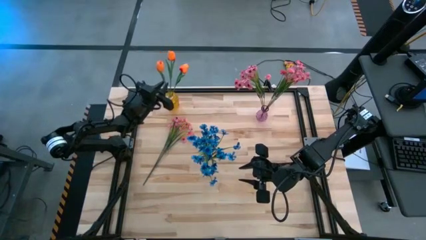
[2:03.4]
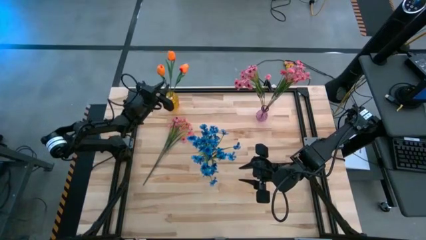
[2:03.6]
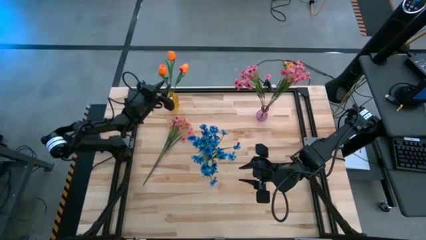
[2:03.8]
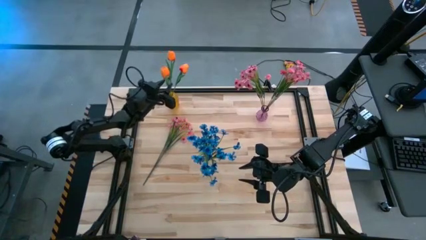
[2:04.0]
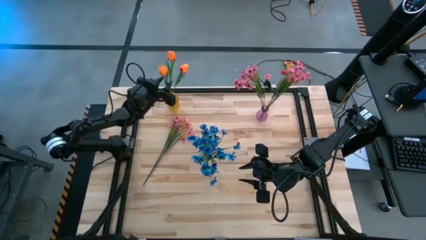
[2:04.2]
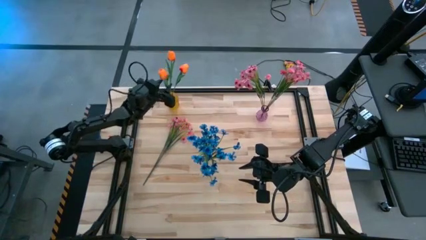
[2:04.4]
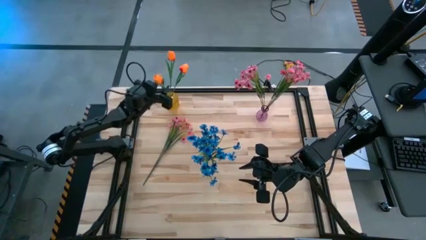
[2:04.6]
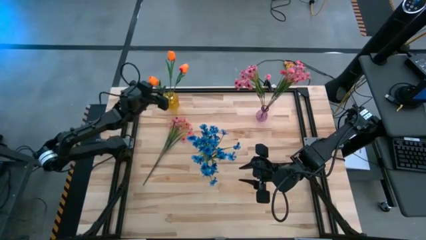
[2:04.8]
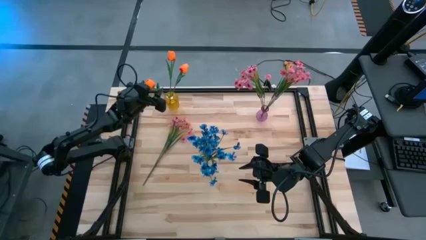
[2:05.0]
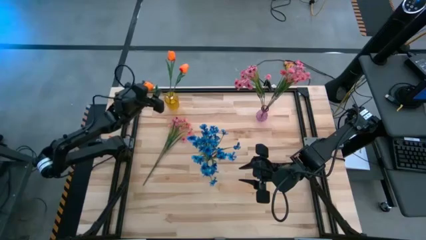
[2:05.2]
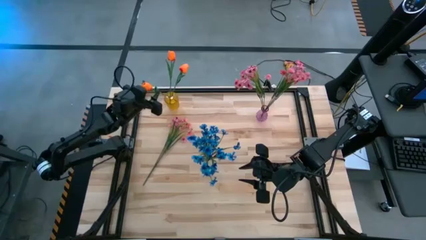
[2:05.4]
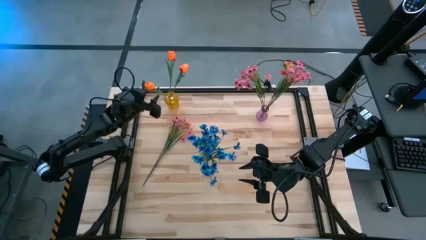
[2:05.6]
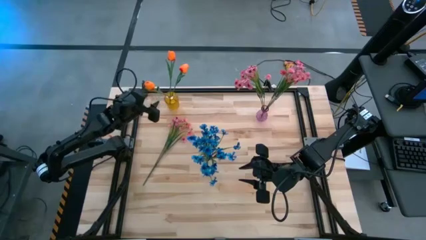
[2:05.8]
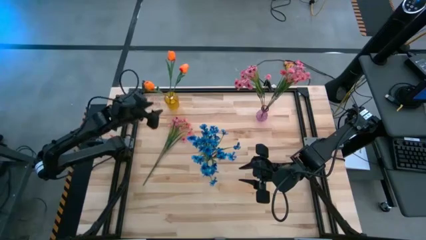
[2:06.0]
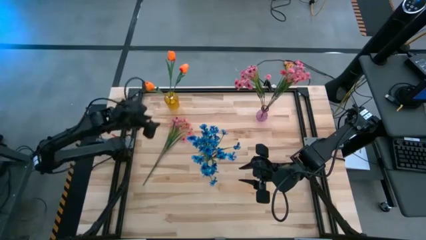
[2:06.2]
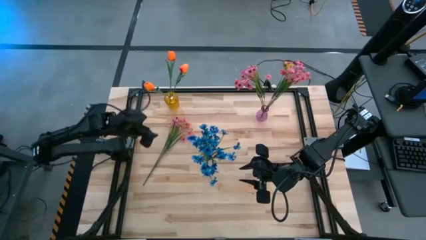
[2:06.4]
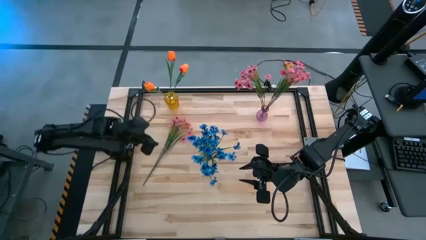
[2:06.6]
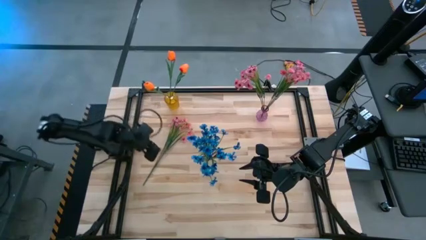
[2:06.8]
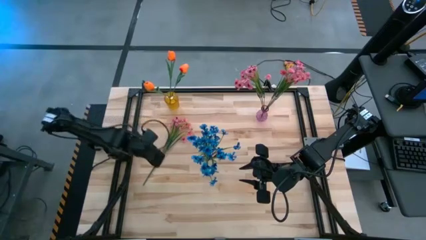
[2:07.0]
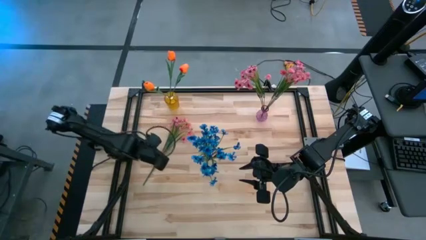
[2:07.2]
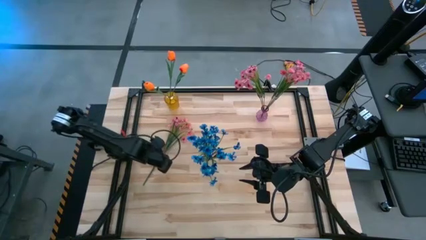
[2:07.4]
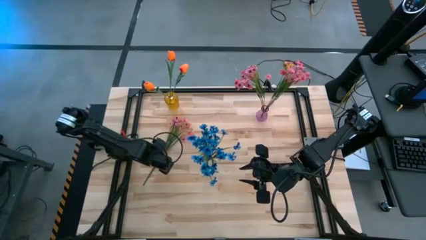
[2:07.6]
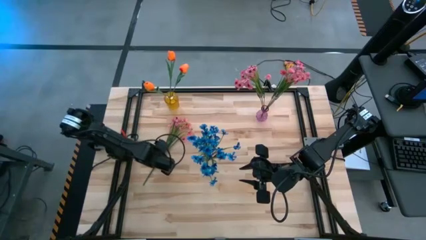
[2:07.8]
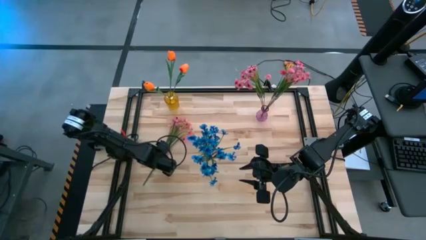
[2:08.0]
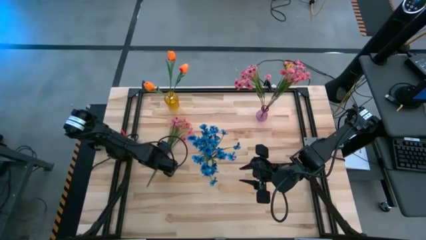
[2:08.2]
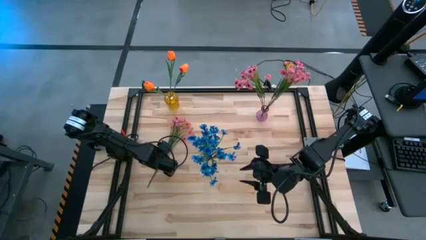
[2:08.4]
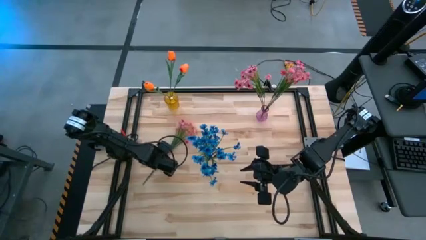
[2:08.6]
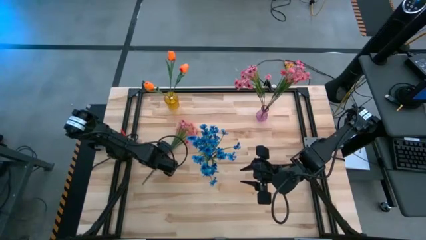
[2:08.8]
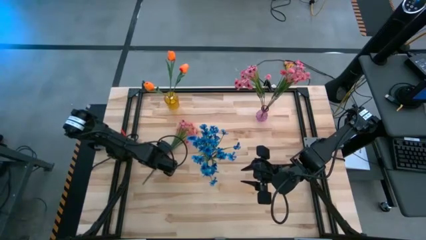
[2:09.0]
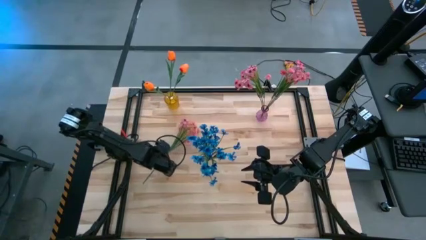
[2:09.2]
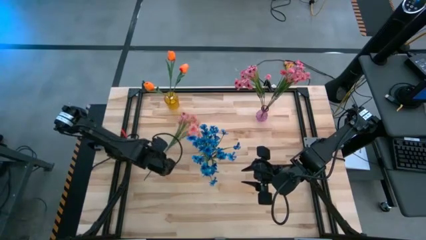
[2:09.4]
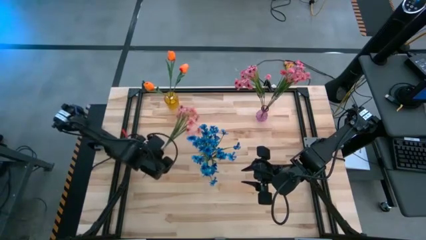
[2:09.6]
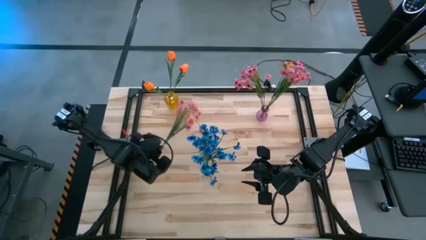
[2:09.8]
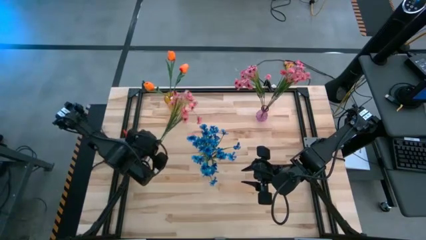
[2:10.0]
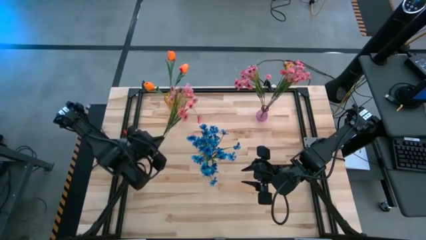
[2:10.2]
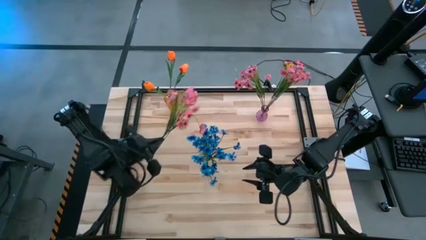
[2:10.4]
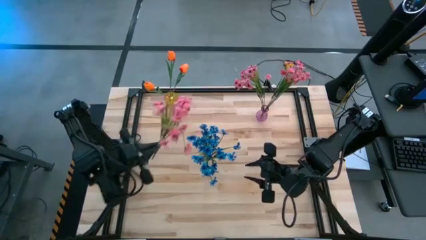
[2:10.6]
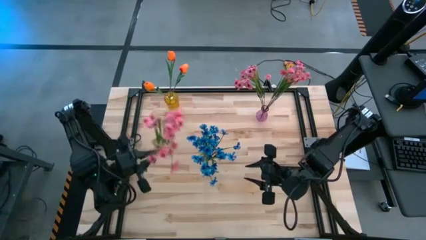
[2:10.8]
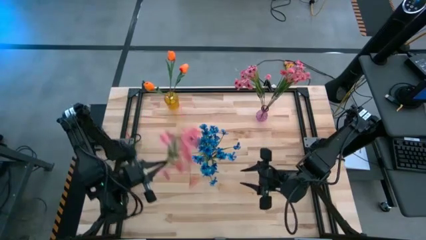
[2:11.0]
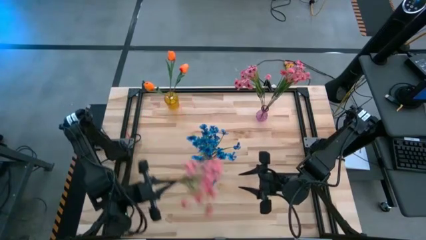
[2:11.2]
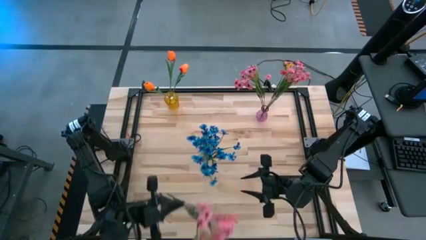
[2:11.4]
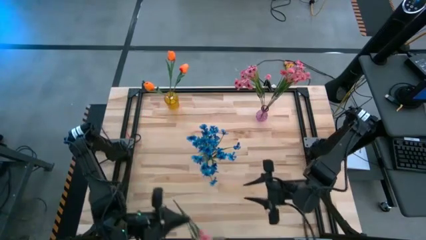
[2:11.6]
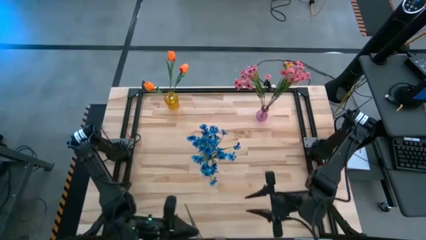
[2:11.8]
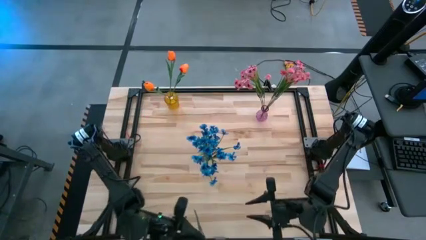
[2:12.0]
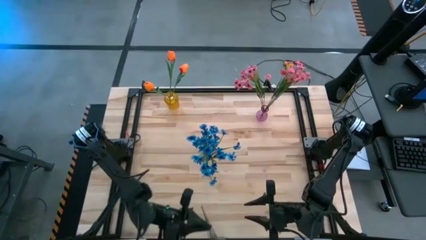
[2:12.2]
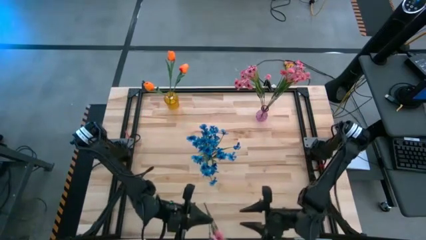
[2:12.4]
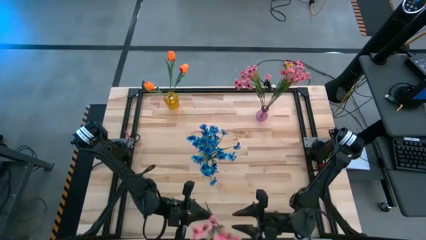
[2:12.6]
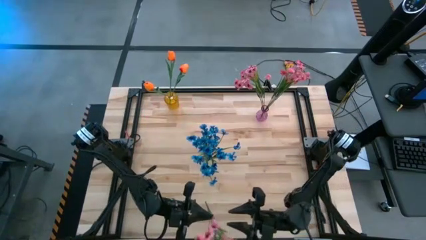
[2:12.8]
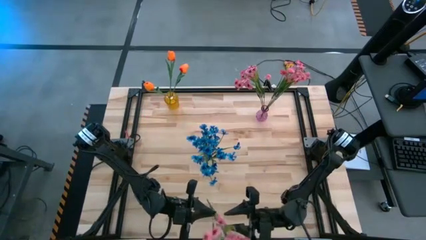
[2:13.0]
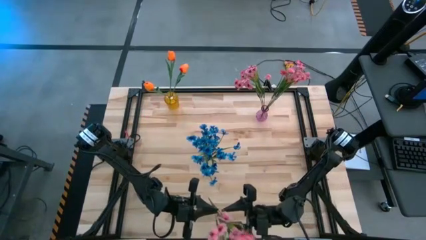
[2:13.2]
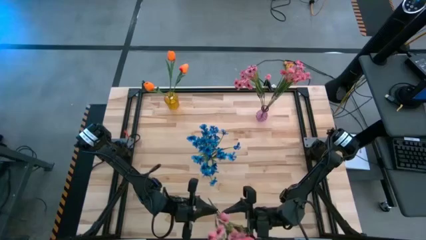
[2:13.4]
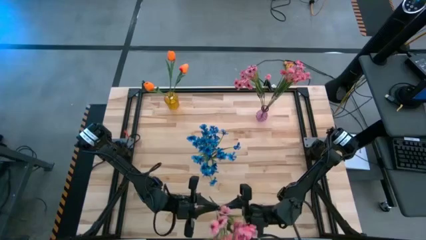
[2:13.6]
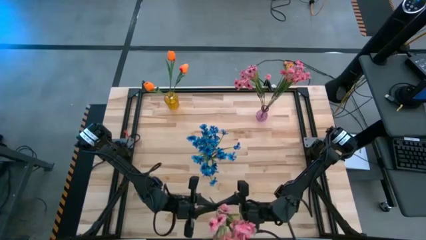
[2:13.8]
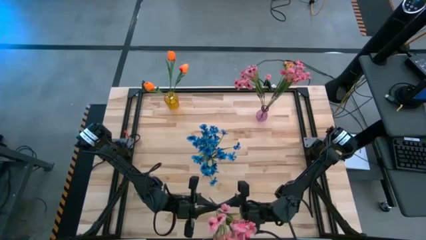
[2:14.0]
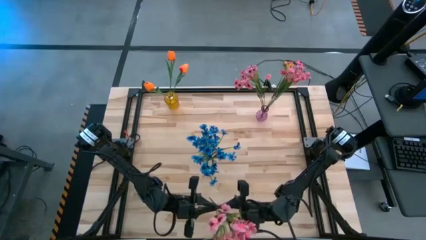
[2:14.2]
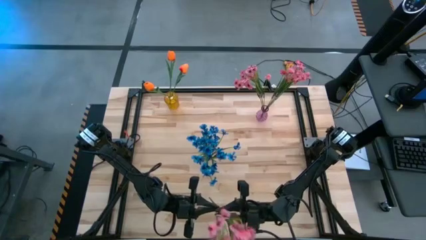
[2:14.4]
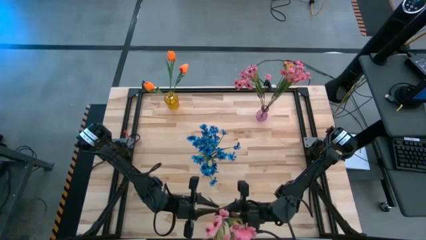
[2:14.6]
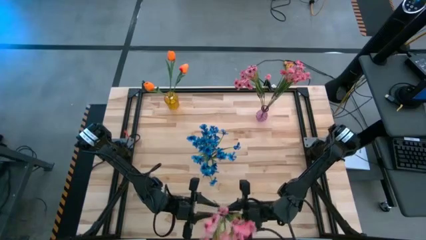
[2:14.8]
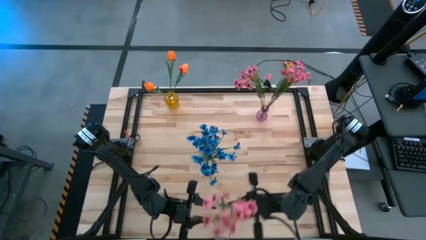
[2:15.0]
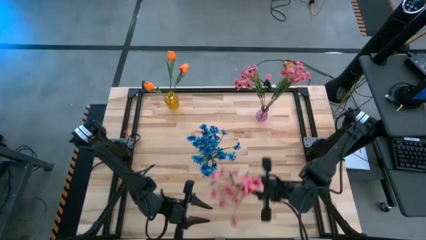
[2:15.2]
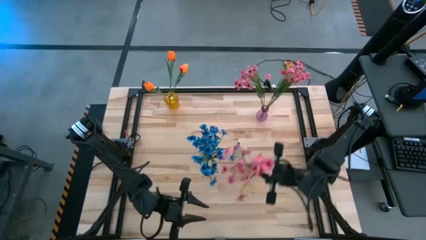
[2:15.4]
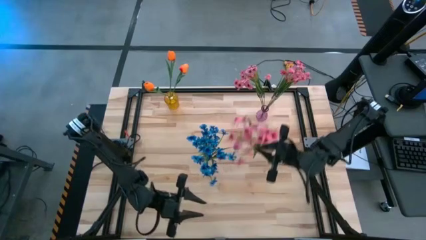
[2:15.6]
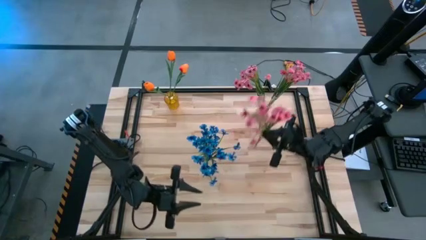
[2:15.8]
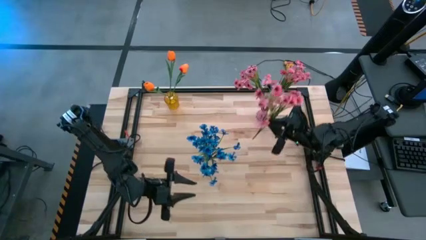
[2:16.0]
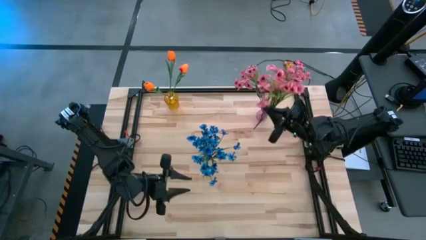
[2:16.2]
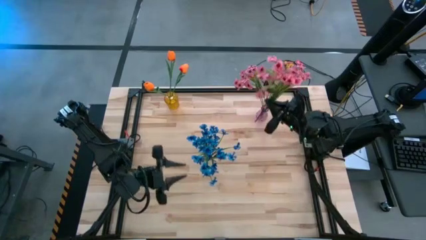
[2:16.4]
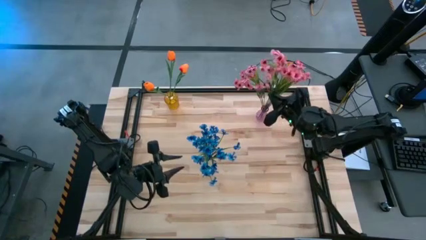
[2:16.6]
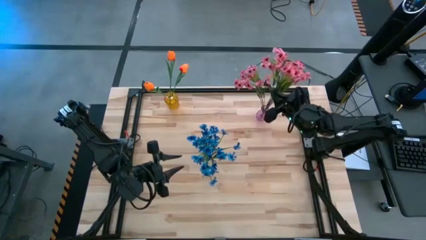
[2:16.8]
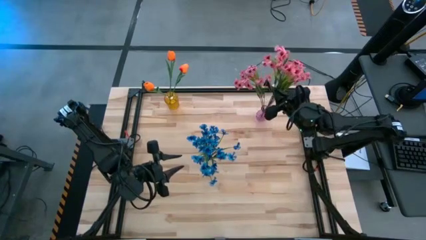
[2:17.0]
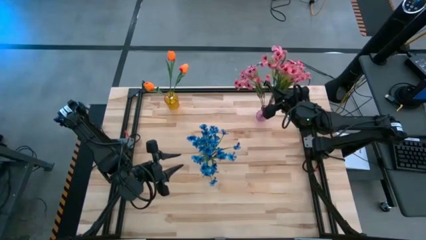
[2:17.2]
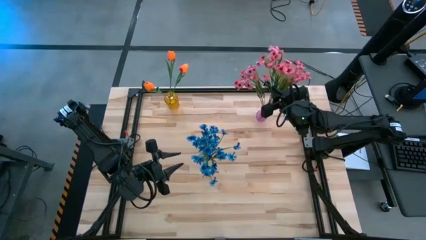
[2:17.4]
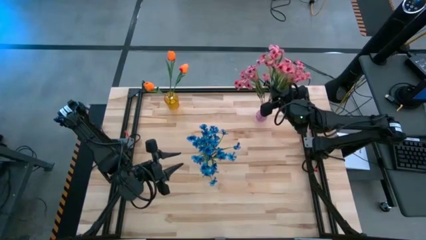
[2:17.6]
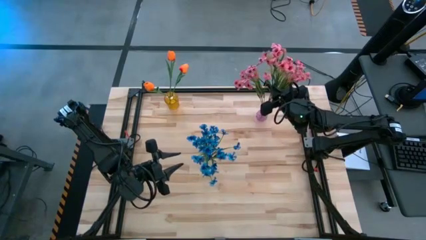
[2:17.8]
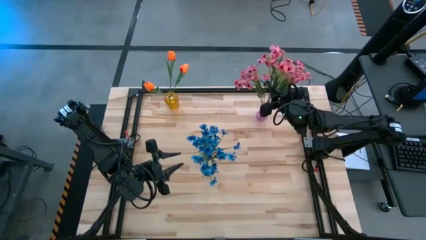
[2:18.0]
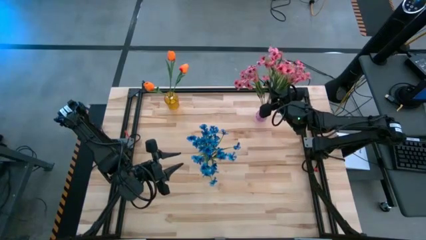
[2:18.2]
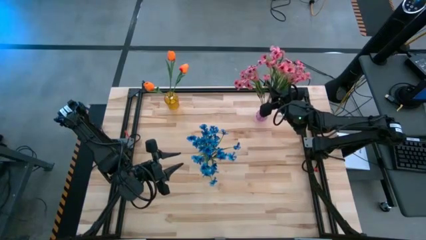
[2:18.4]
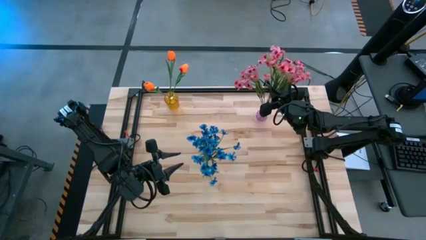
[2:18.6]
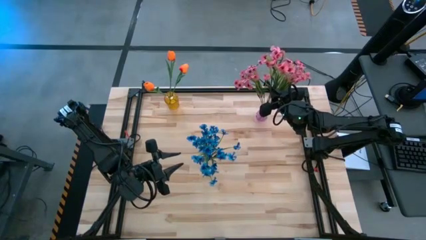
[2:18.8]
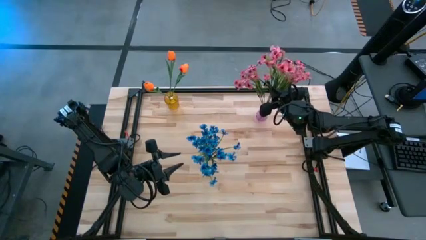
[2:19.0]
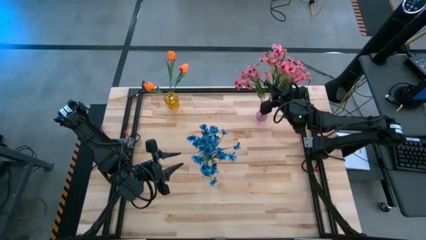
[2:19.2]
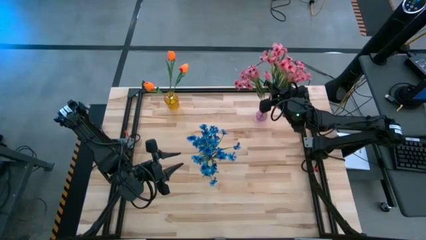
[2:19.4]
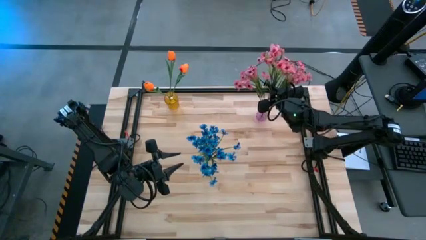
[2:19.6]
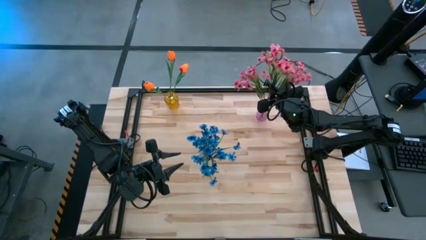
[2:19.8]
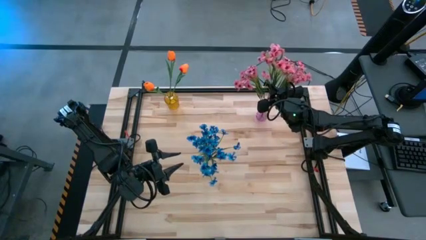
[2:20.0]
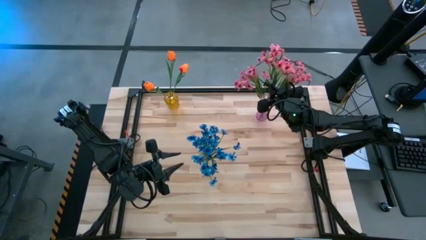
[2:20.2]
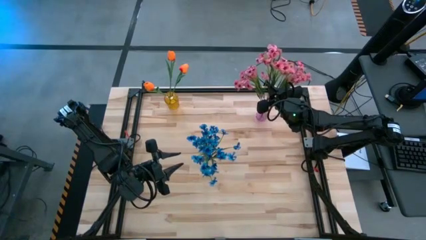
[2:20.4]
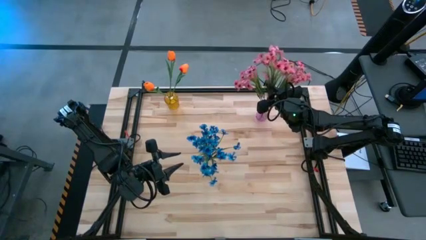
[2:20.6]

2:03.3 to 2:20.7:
Task: Sort flowers into vase by color
Put the pink flowers into the pink vase
